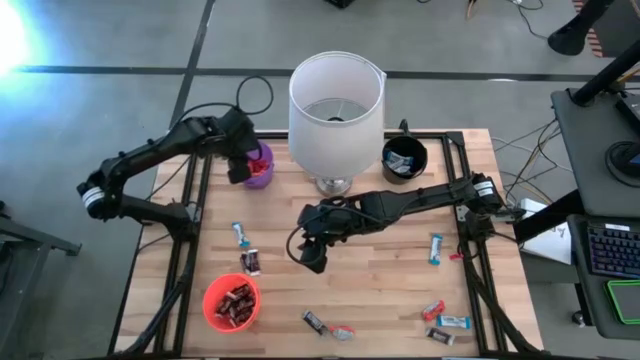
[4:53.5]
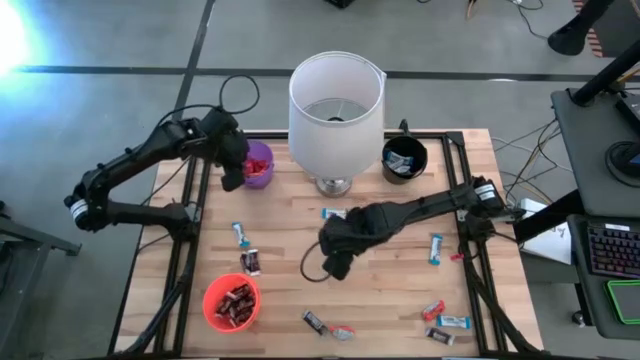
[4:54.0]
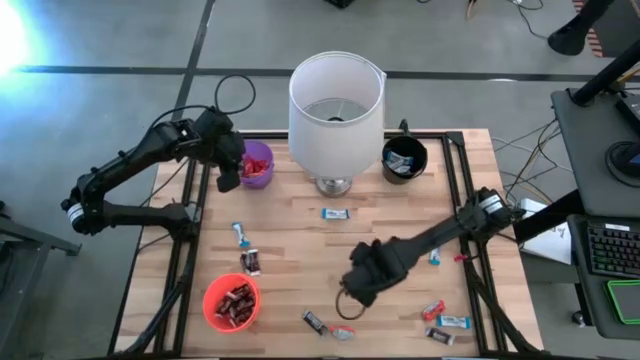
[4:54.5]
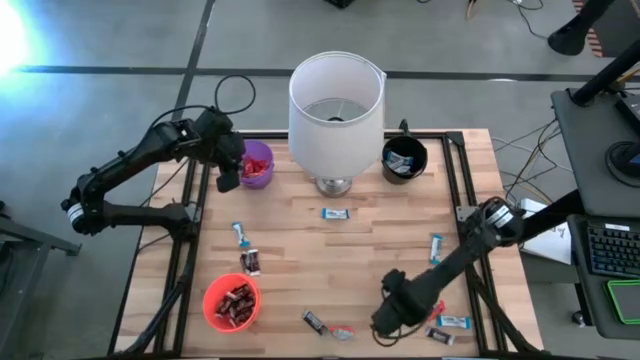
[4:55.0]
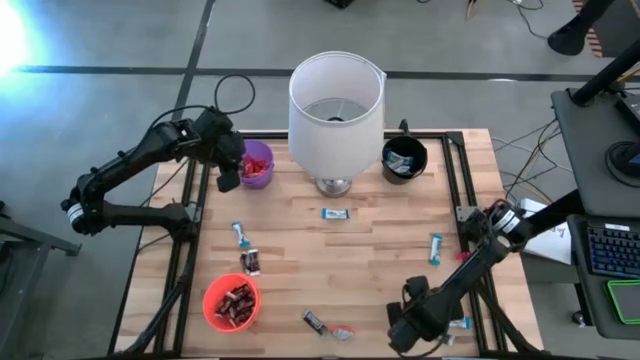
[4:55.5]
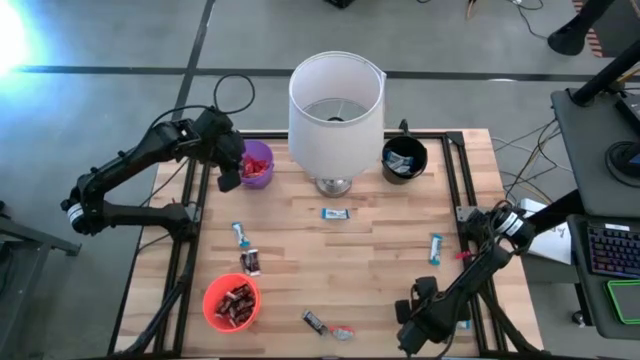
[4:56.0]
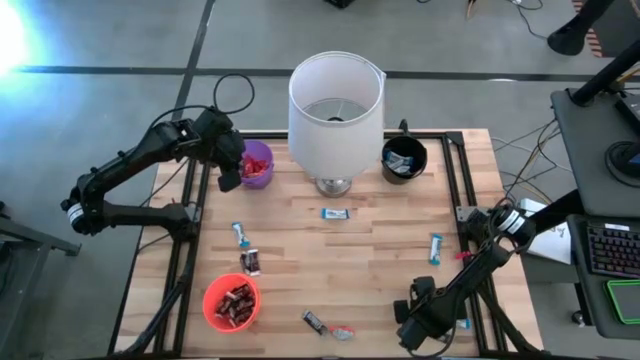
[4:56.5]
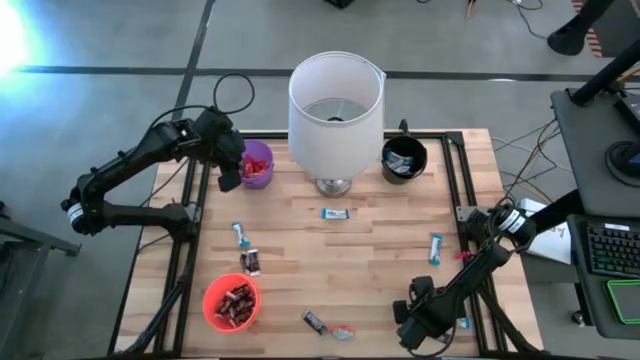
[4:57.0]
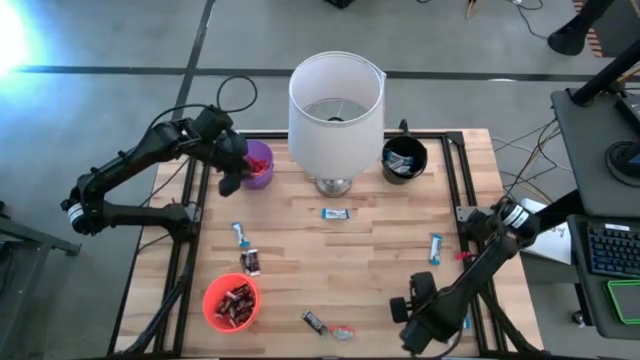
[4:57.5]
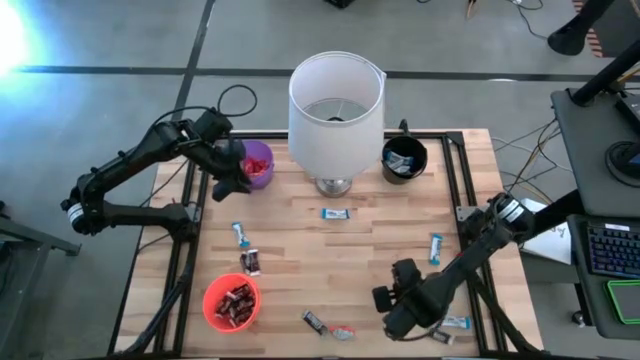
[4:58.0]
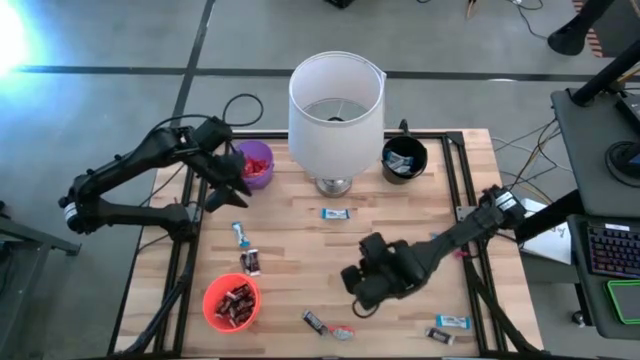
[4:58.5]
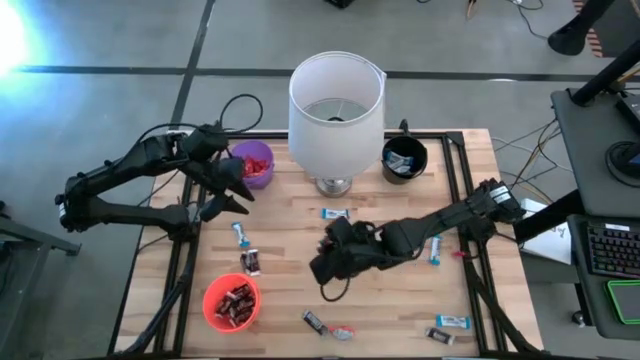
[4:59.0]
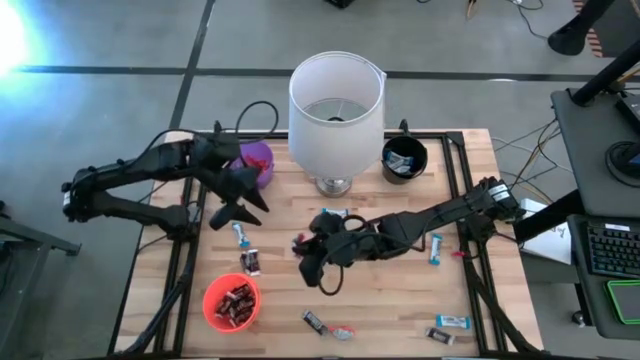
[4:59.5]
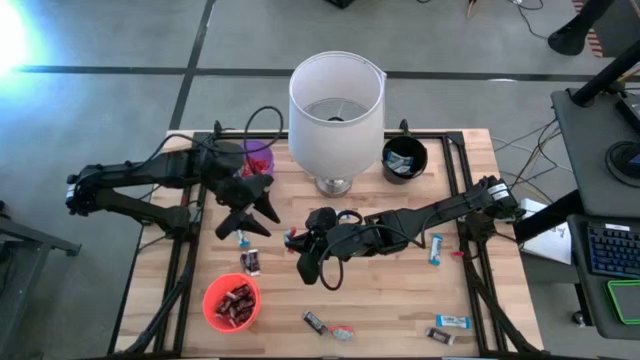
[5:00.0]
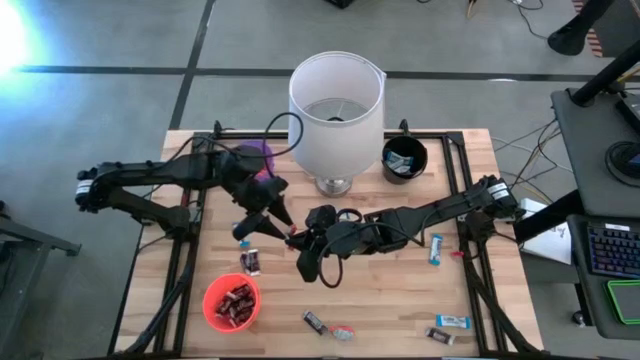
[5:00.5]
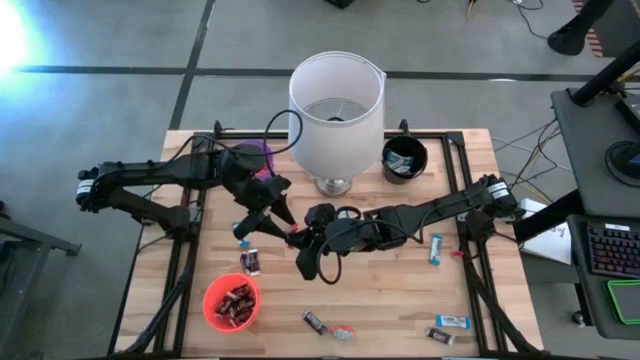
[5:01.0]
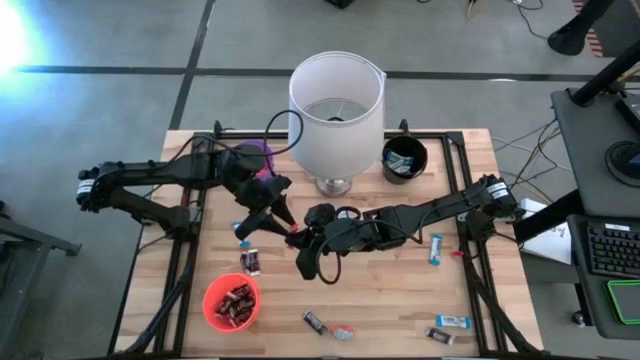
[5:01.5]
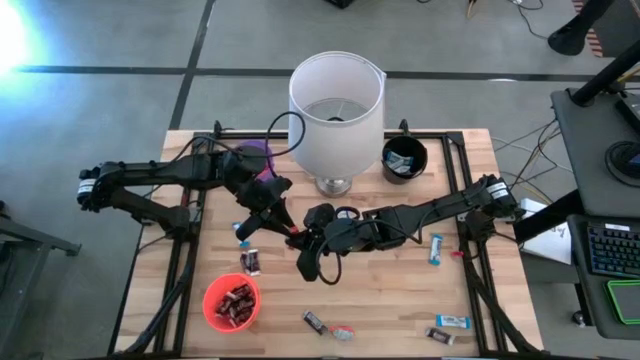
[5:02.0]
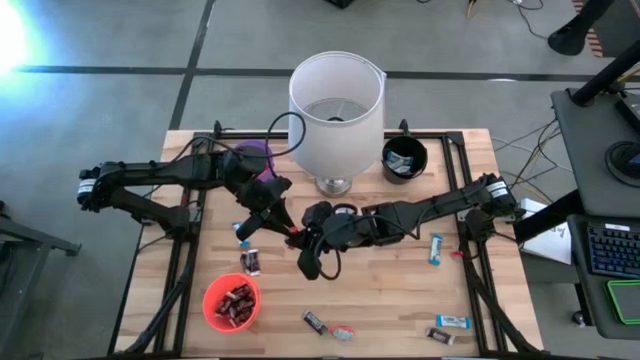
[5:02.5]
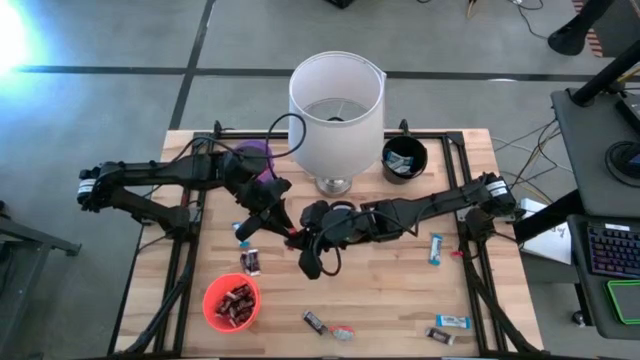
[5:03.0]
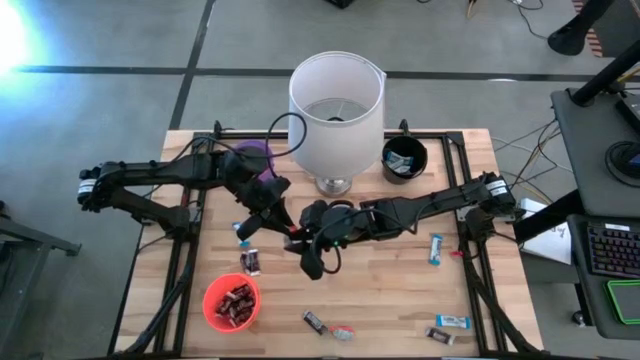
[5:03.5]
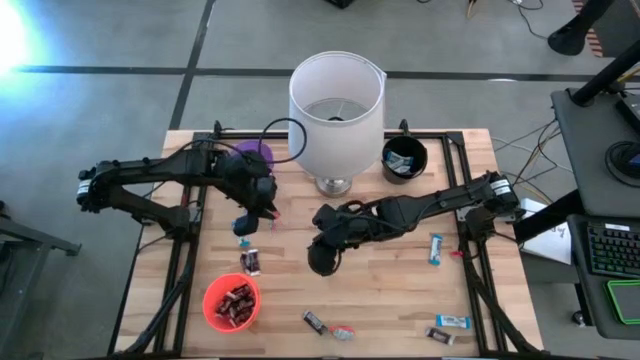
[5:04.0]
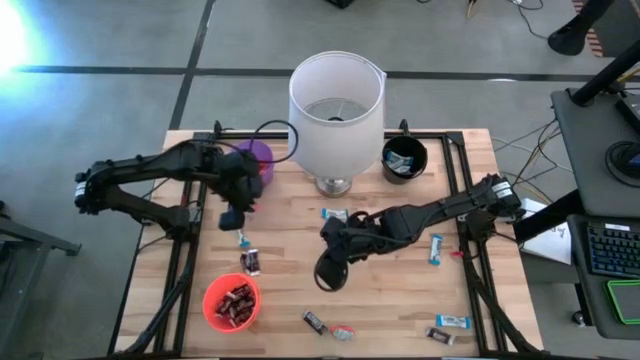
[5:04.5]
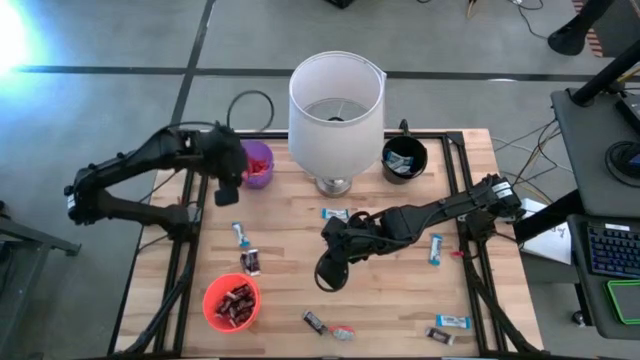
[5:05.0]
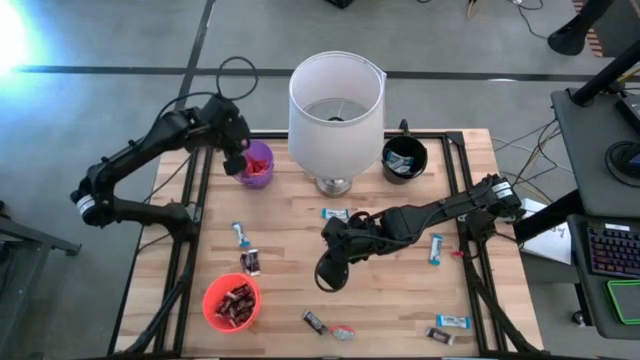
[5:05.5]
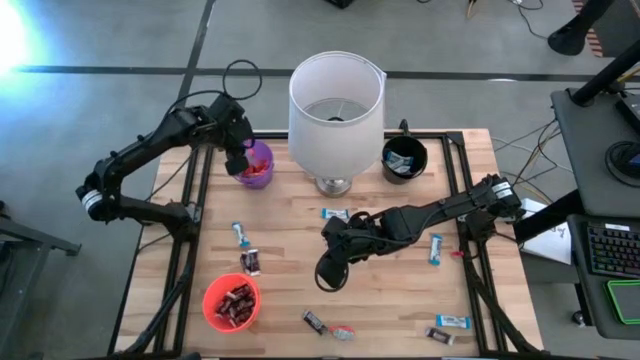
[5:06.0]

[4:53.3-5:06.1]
Task: Sort candy
Put the orange chocolate into the purple bucket

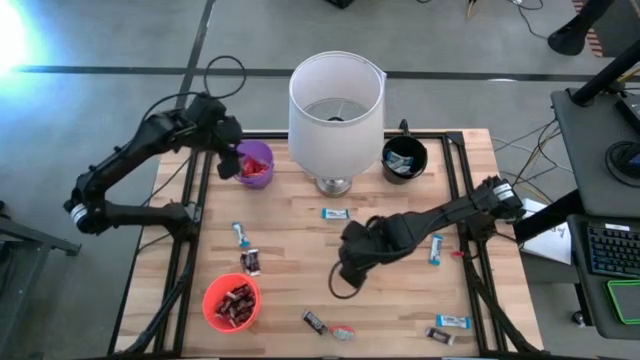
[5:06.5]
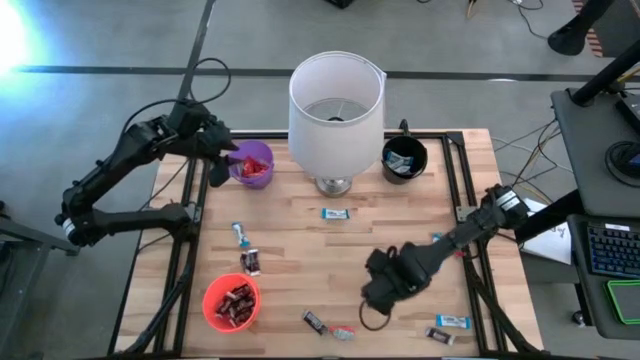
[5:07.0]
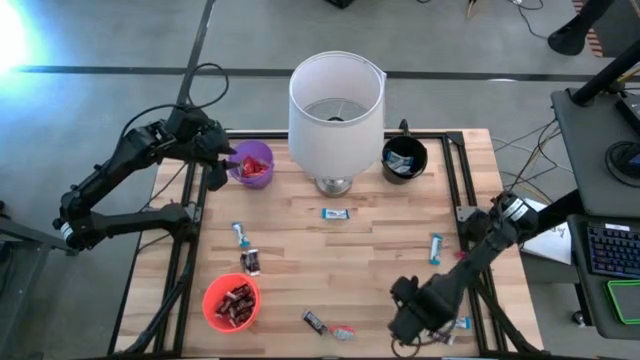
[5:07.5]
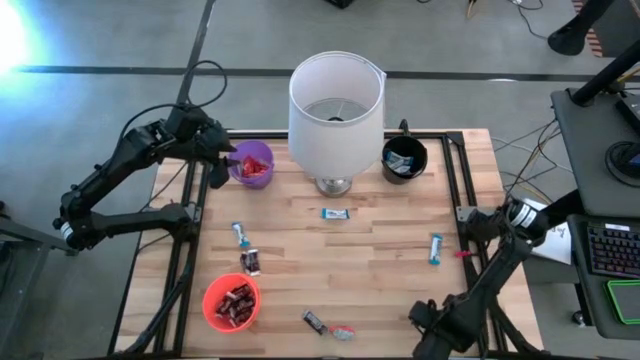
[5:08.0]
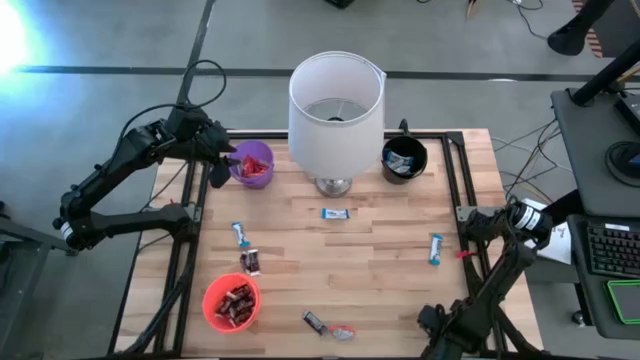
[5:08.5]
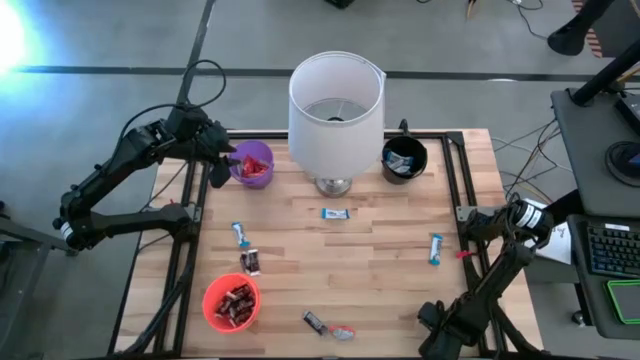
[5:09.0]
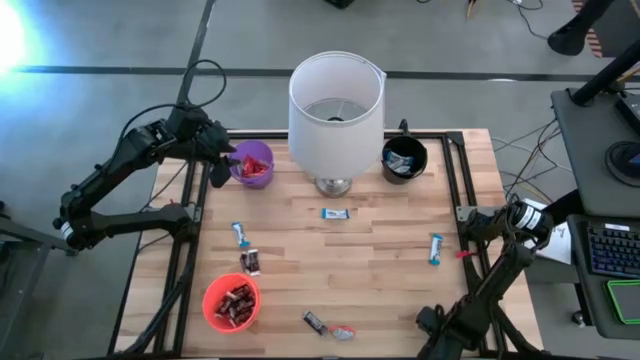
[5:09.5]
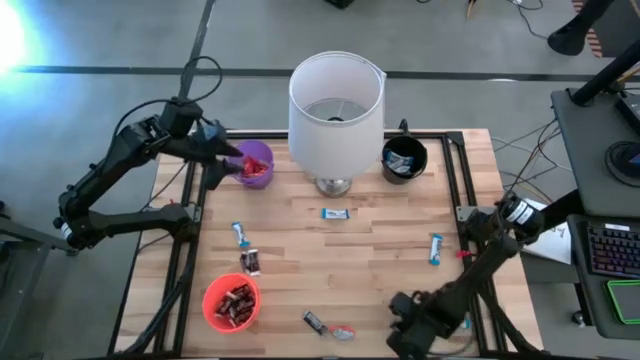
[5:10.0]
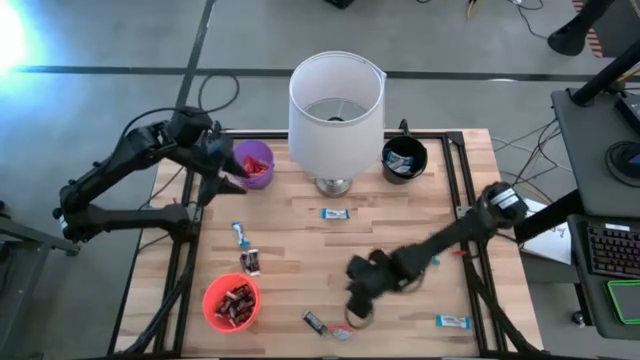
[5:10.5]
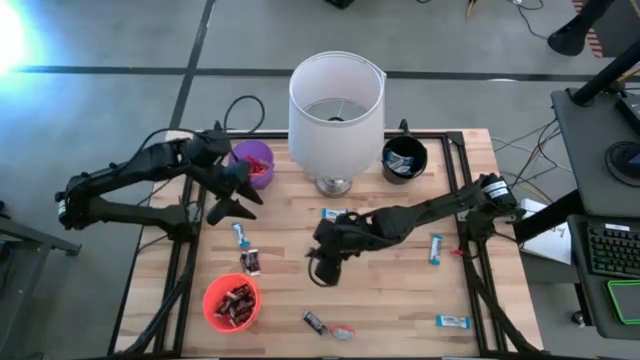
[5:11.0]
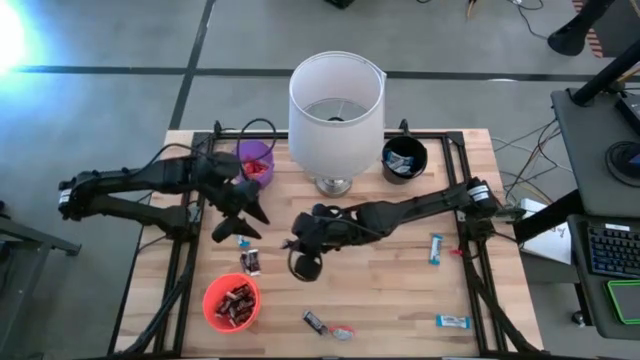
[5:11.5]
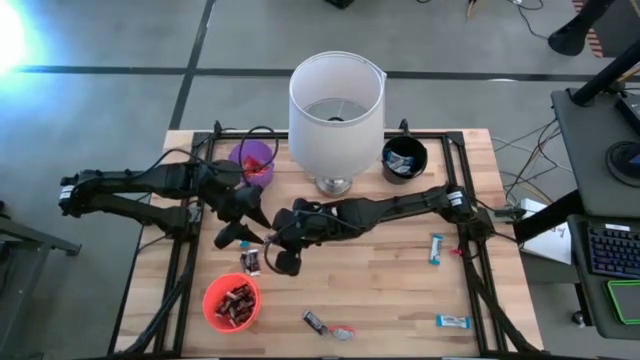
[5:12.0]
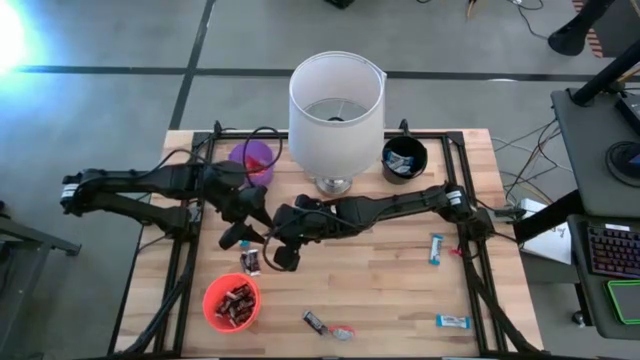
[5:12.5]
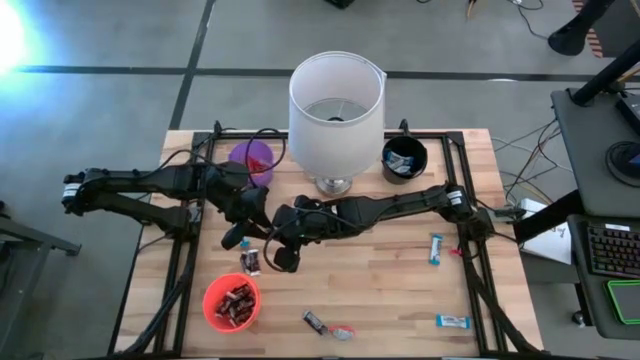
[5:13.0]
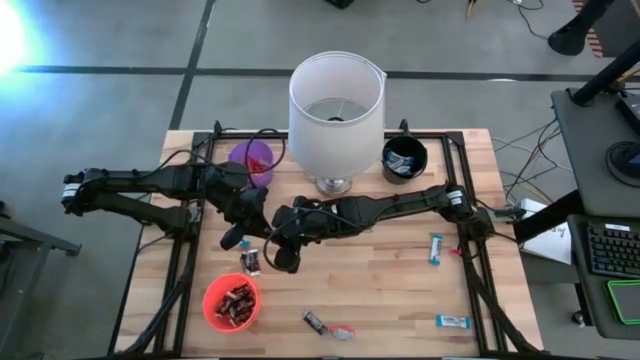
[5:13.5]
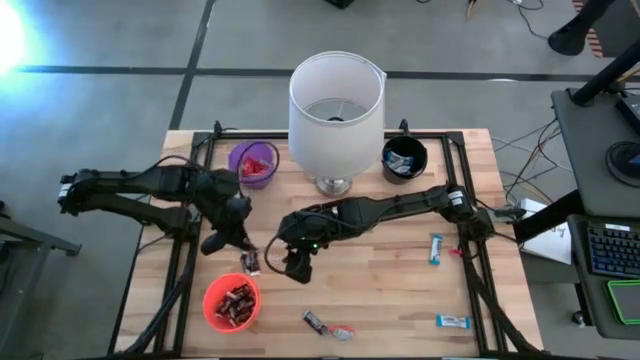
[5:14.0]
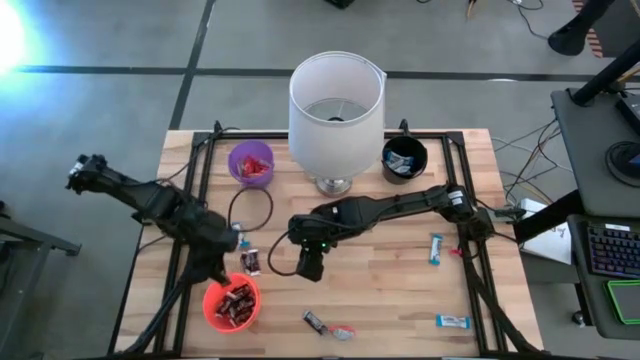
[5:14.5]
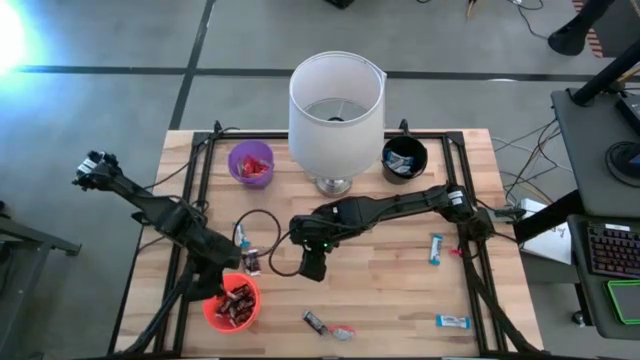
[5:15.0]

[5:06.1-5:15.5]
Put the black chocolate into the orange bucket
